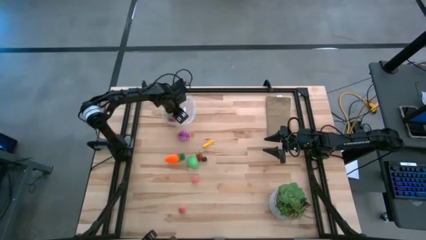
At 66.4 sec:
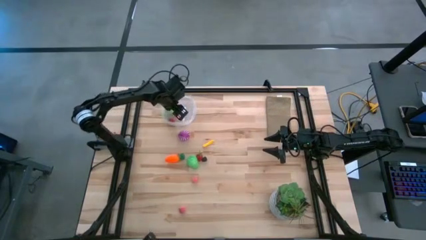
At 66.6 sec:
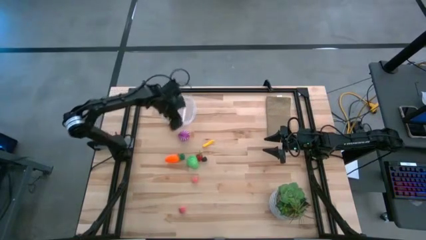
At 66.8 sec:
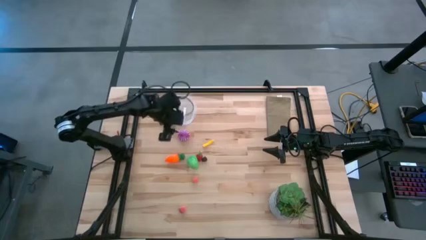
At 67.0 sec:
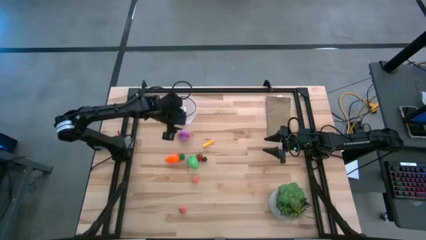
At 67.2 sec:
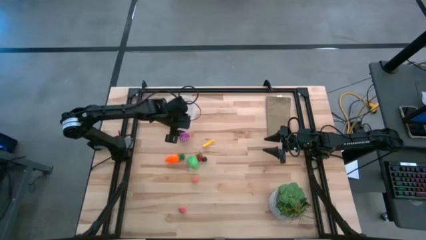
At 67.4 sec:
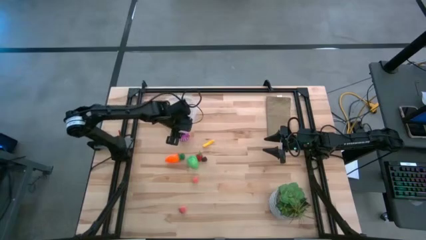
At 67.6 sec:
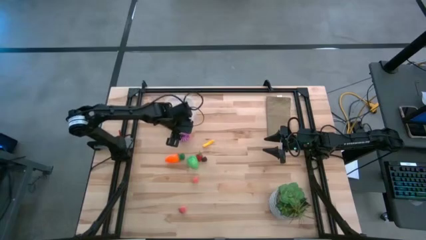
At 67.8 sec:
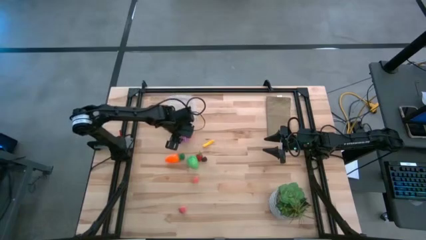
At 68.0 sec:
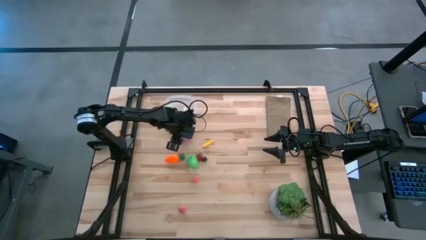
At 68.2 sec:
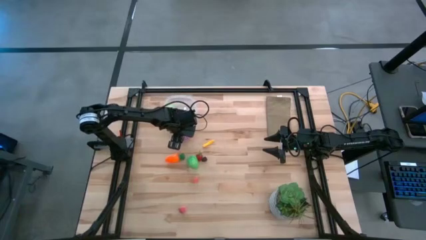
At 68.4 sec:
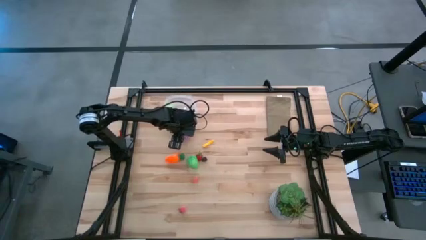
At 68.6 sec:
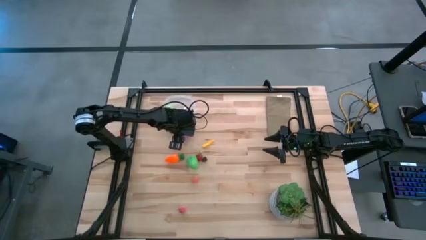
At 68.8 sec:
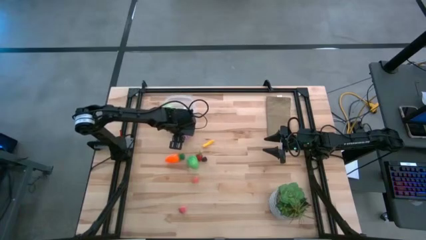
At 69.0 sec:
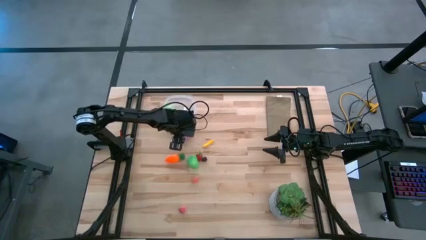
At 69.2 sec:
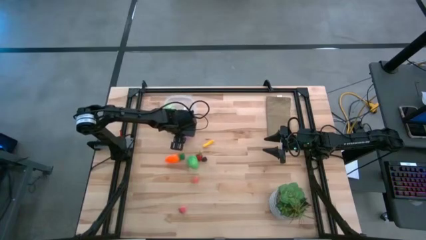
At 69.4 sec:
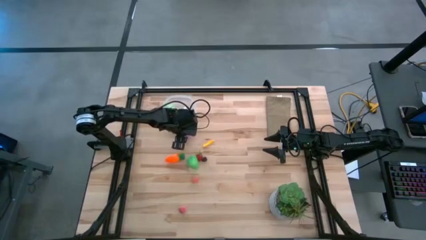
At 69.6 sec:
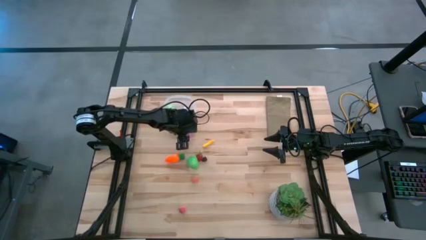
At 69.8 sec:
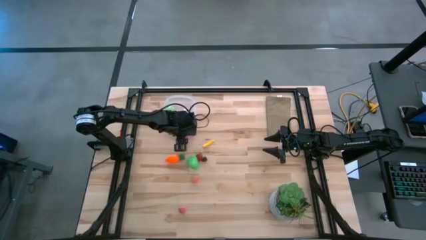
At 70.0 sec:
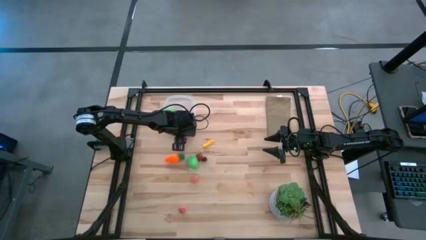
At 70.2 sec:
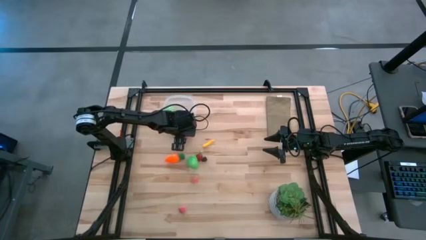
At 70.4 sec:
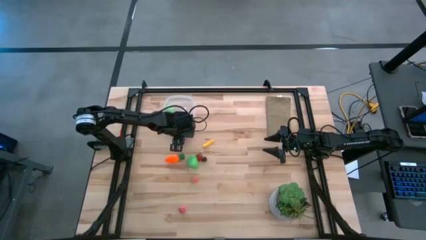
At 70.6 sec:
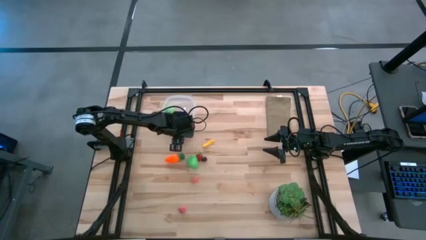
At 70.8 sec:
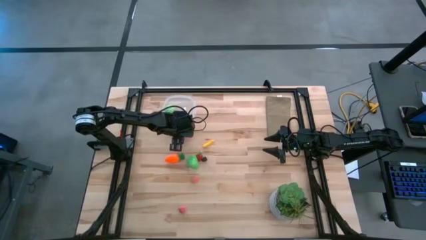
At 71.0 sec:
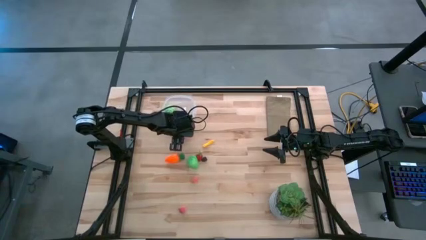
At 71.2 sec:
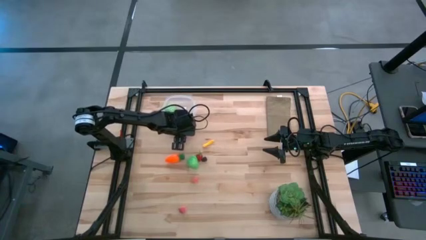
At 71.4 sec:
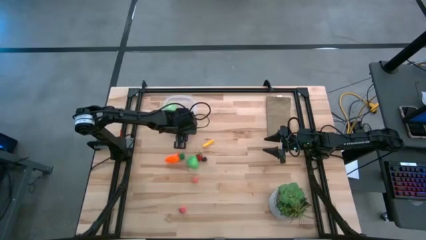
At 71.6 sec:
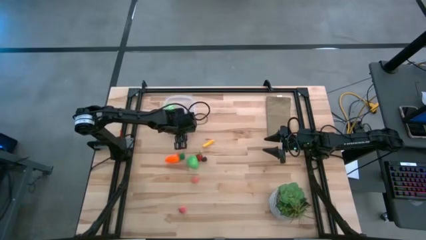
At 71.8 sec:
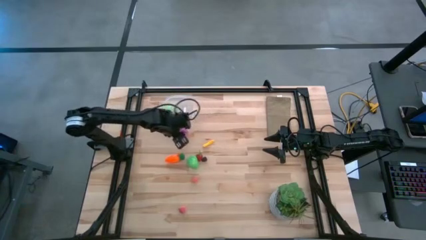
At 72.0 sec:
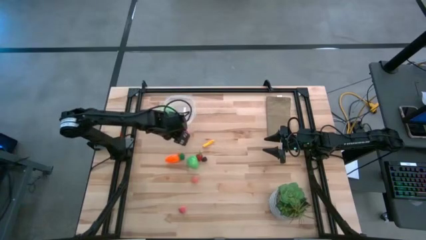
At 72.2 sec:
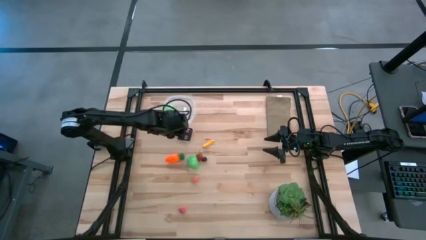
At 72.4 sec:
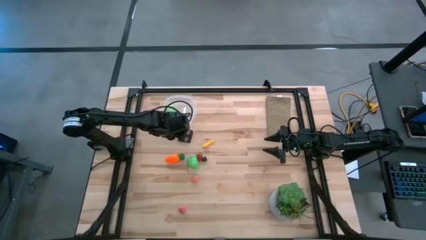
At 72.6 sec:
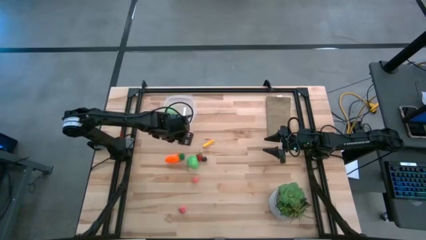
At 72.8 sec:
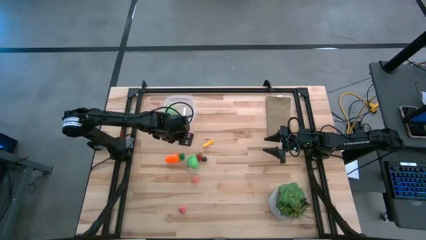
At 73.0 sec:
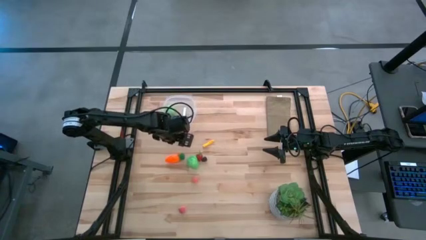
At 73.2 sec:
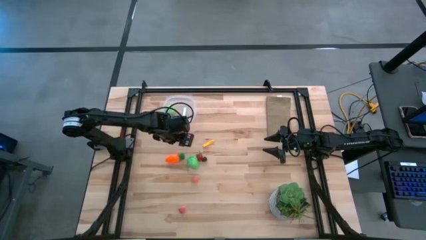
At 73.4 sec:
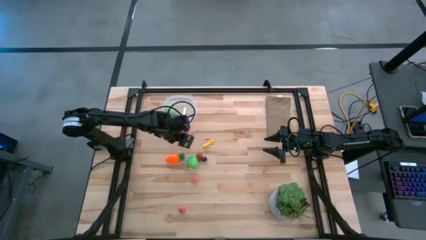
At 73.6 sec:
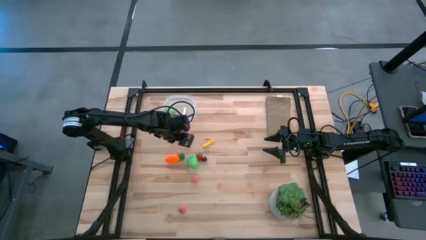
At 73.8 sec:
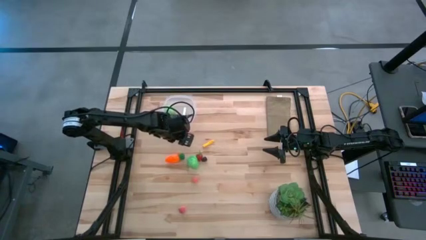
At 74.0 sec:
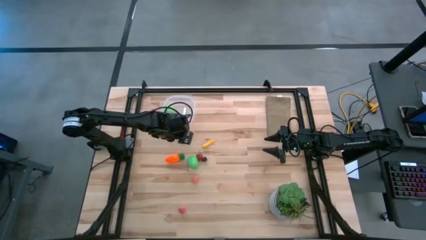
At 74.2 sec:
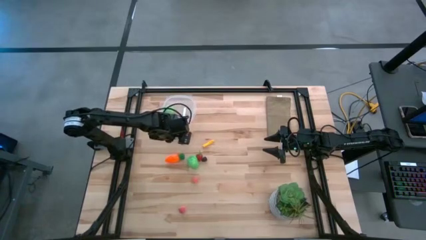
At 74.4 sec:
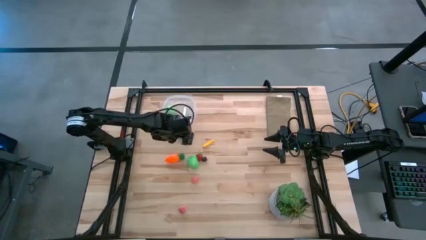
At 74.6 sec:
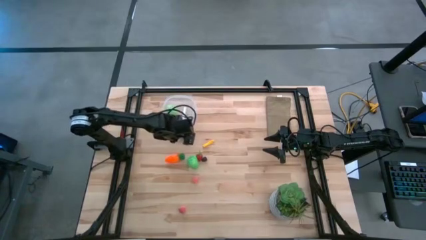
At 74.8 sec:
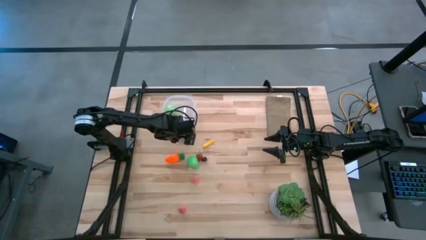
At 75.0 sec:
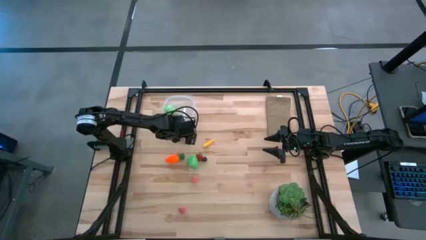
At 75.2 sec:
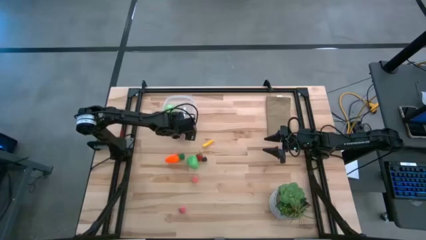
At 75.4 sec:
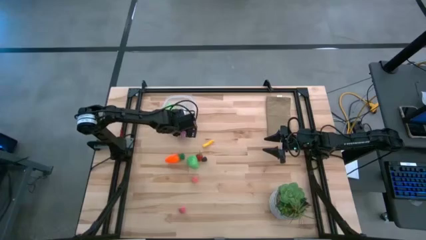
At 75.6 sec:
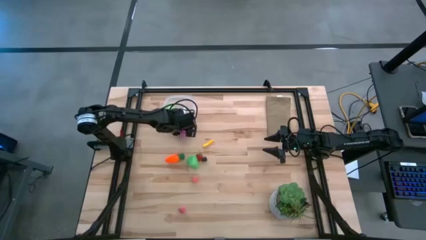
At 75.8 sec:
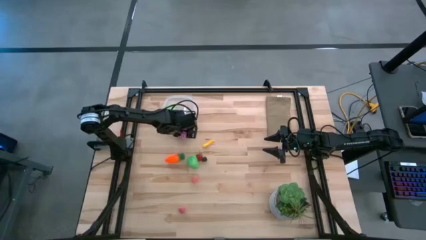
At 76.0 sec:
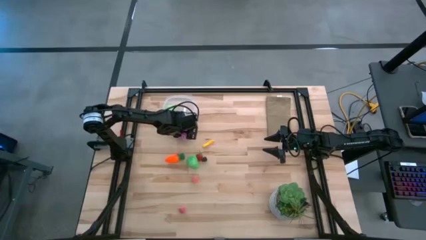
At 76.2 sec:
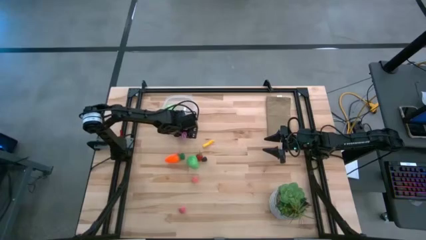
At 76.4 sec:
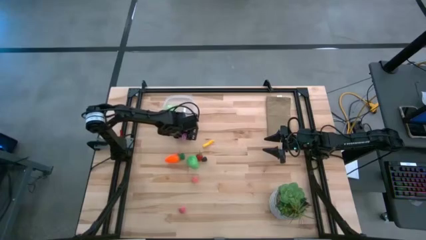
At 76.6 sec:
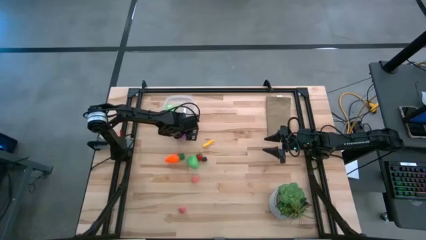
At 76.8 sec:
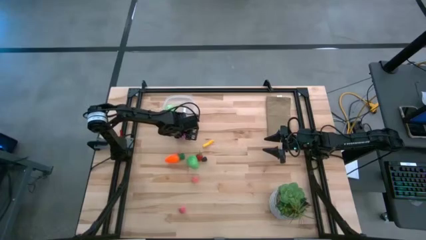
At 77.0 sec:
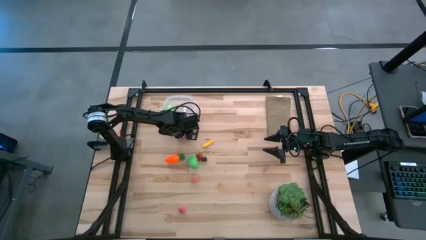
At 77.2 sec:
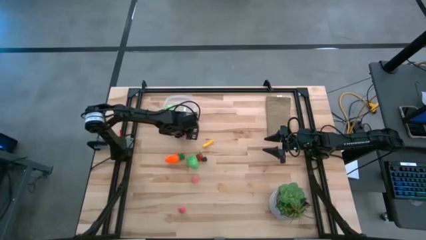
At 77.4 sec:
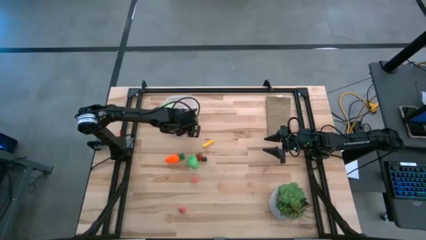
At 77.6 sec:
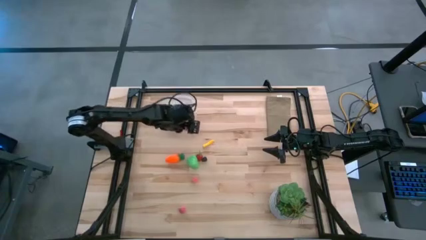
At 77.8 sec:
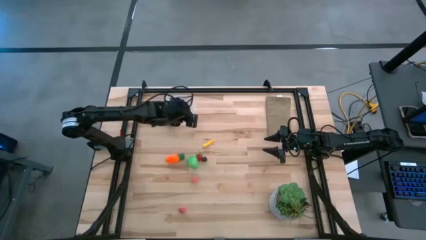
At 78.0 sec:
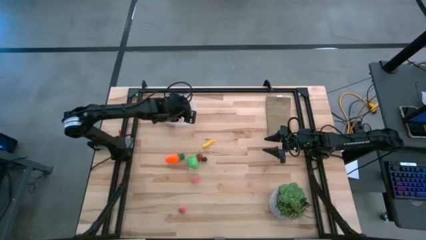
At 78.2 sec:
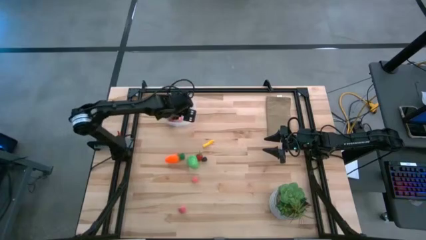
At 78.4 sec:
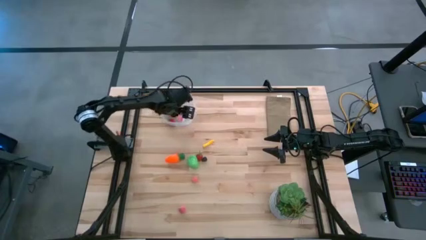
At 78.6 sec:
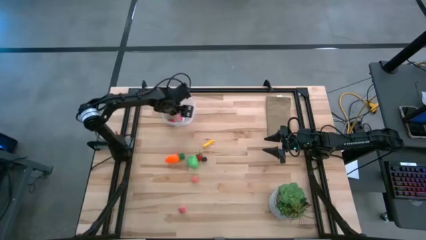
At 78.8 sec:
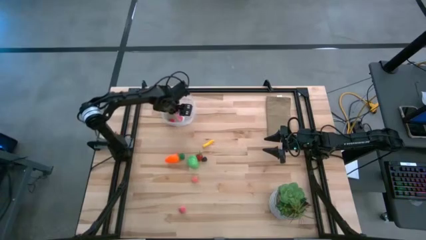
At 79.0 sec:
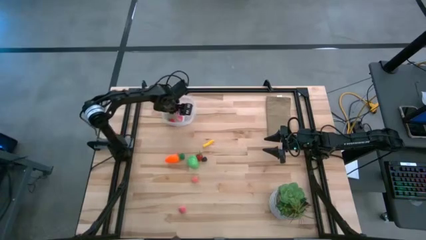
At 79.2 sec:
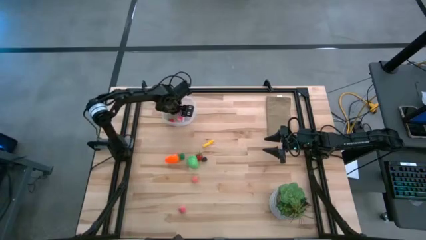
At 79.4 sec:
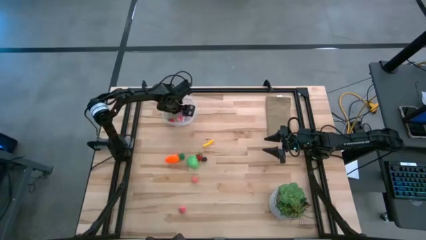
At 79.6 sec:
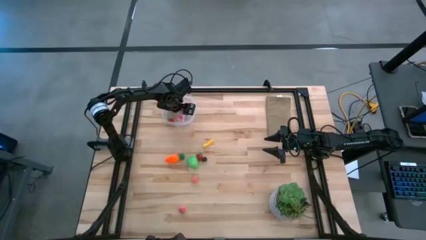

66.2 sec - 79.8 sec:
Task: Pick and placing Produce into tupperware
Put the onion into the transparent bin

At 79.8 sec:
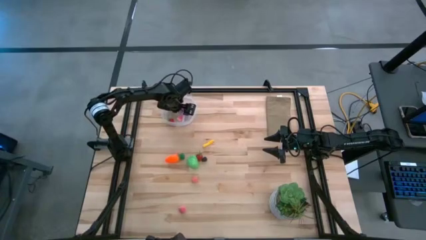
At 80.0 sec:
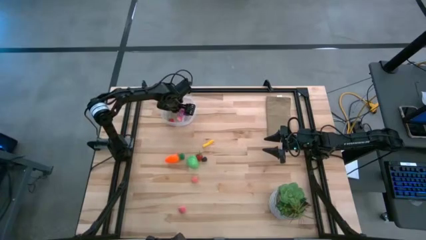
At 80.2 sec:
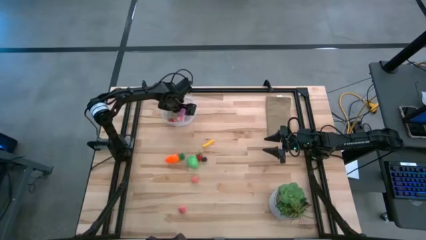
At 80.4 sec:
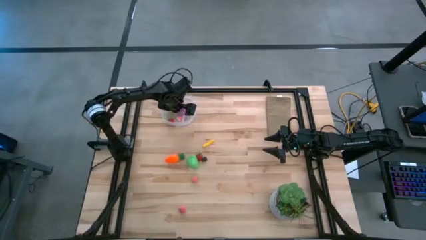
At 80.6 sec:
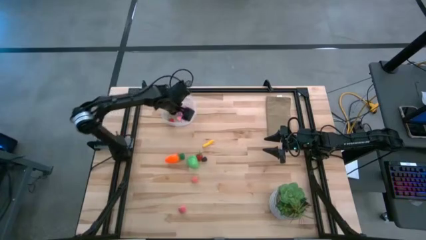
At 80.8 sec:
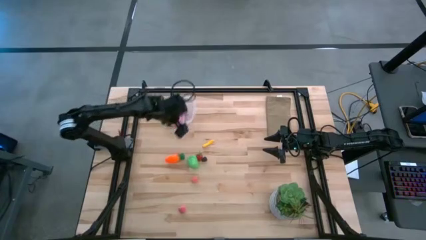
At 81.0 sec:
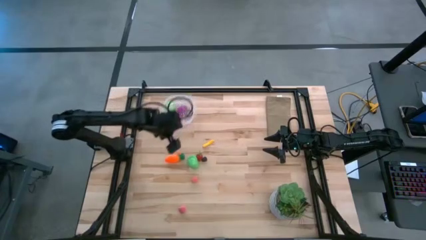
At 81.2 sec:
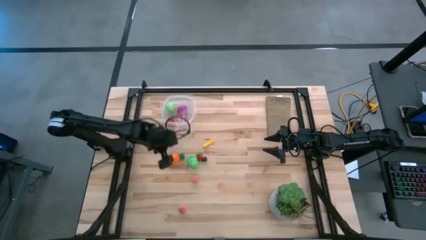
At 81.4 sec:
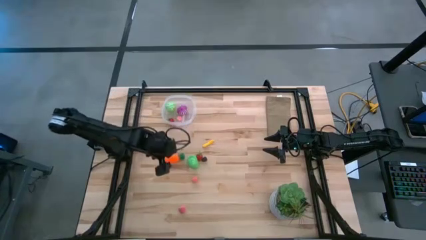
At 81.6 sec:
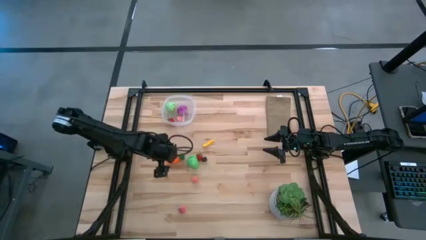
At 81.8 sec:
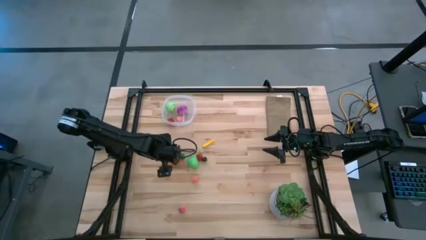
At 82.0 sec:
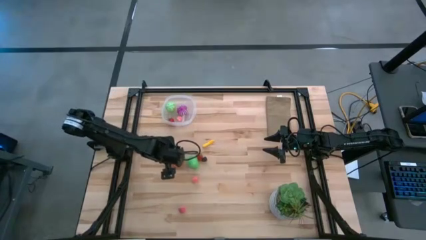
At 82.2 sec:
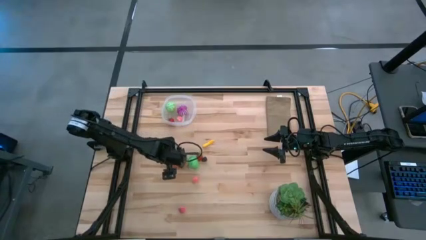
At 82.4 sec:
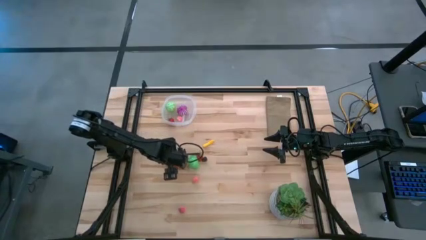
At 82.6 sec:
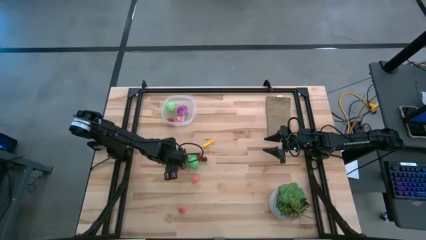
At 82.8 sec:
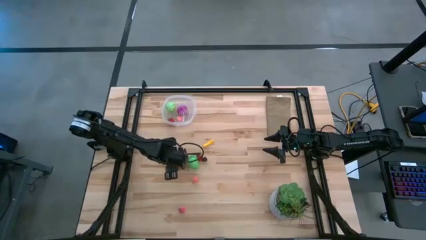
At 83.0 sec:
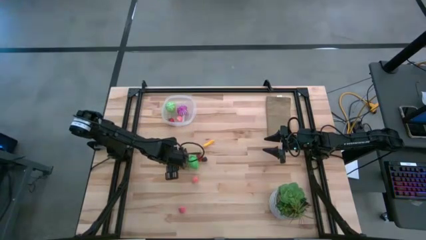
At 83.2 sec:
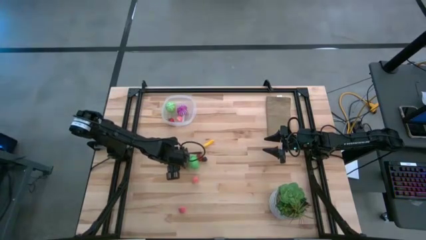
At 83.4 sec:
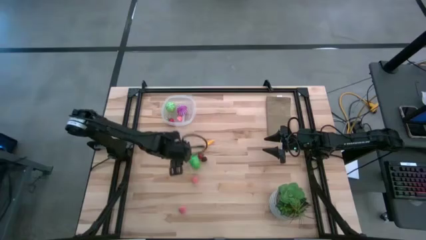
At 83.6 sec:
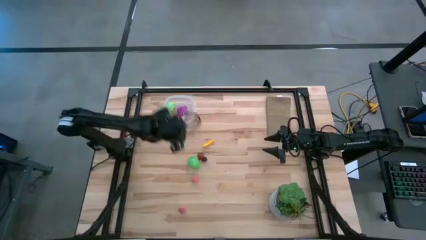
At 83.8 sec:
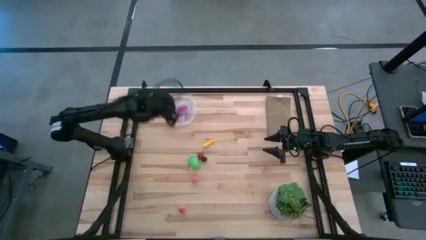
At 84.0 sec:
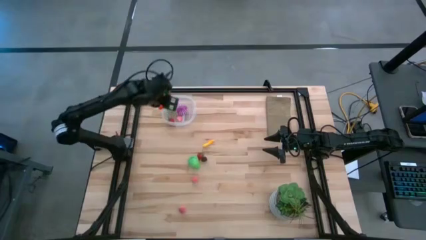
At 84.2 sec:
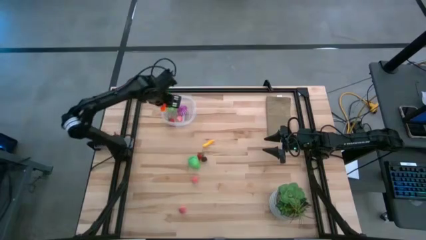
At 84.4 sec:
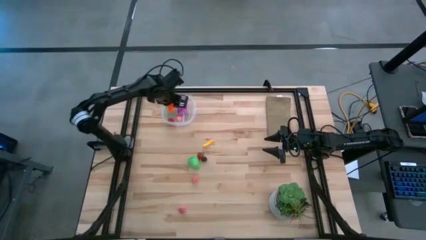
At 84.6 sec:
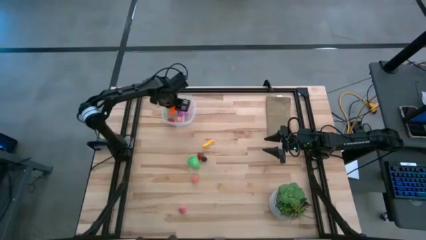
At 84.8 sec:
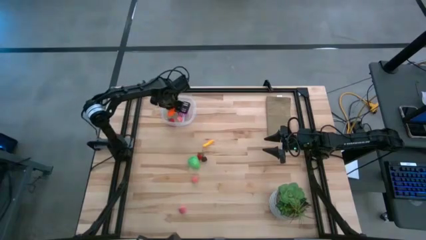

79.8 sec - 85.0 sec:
Put the carrot into the transparent bin
